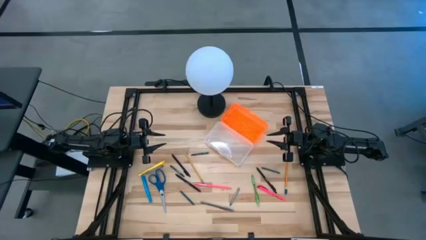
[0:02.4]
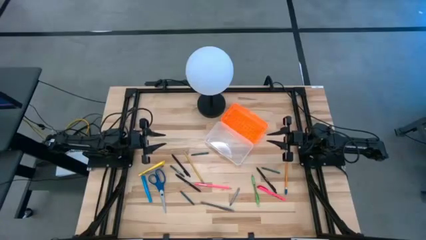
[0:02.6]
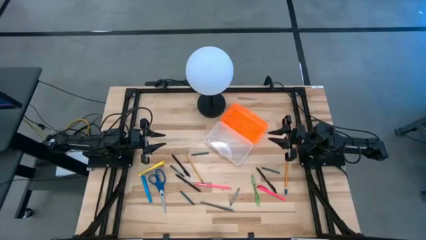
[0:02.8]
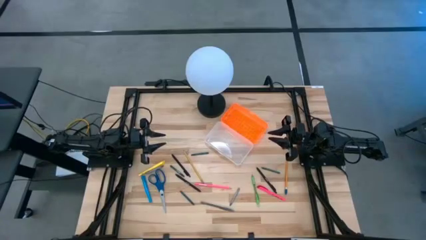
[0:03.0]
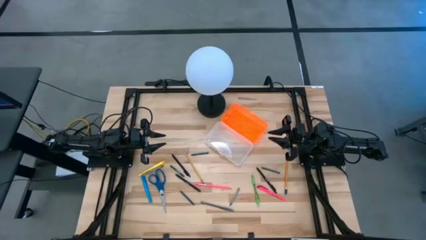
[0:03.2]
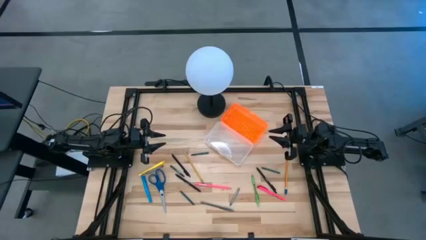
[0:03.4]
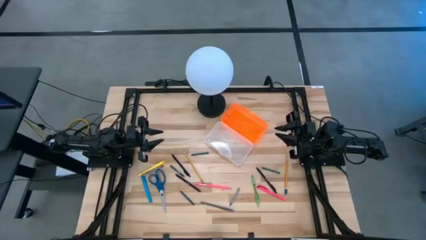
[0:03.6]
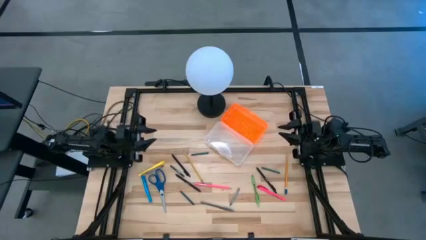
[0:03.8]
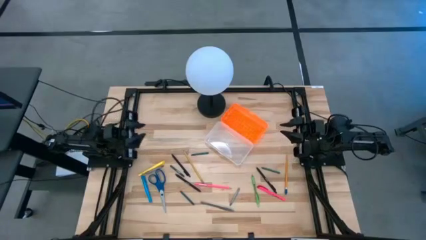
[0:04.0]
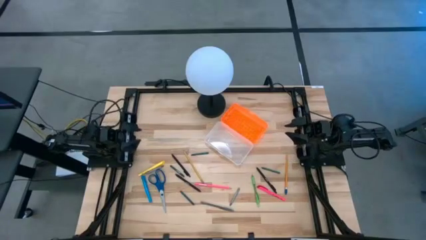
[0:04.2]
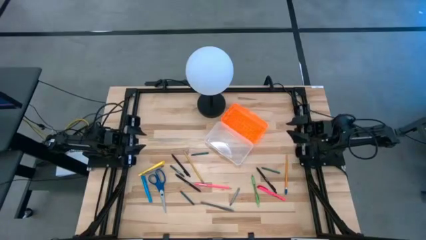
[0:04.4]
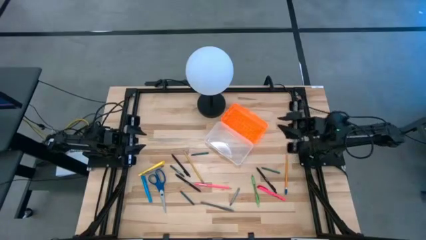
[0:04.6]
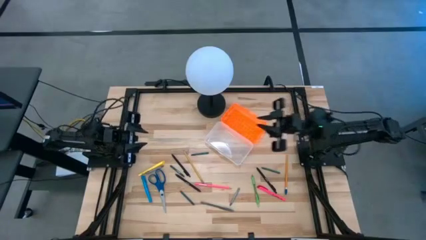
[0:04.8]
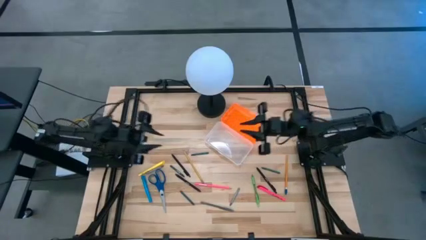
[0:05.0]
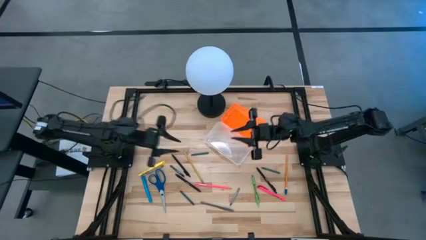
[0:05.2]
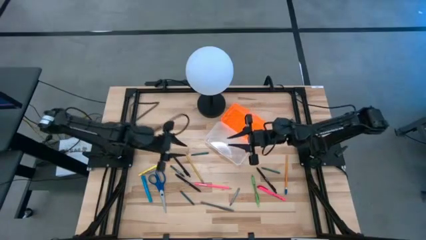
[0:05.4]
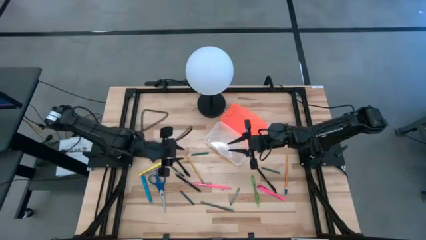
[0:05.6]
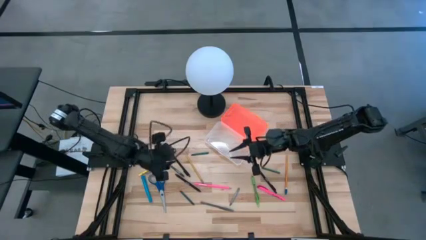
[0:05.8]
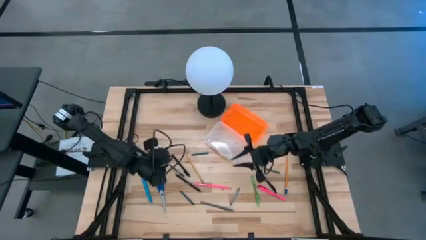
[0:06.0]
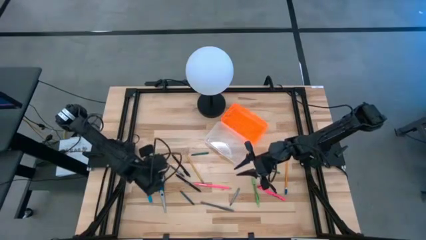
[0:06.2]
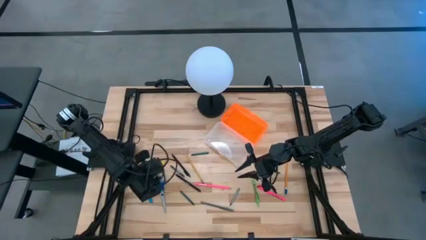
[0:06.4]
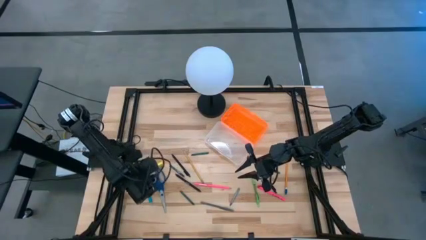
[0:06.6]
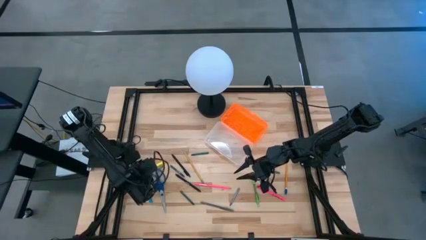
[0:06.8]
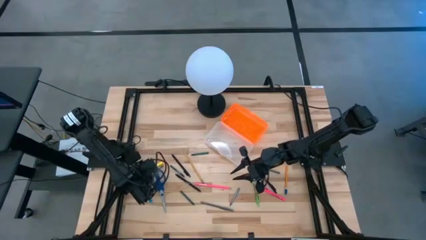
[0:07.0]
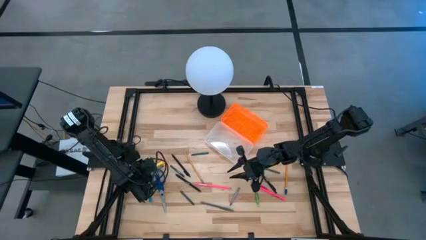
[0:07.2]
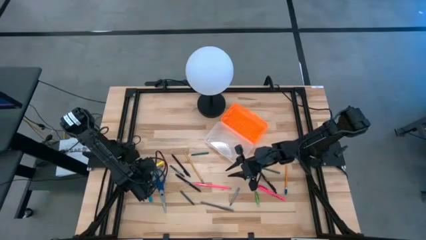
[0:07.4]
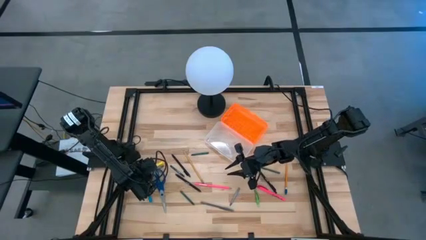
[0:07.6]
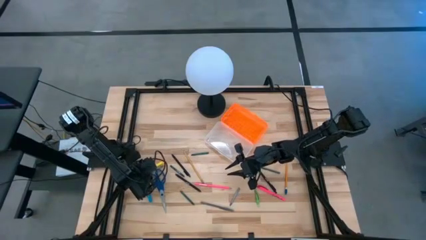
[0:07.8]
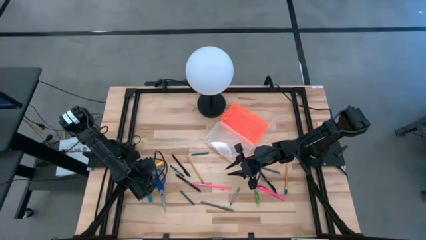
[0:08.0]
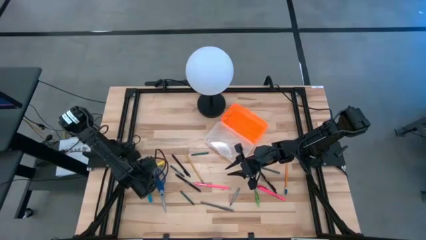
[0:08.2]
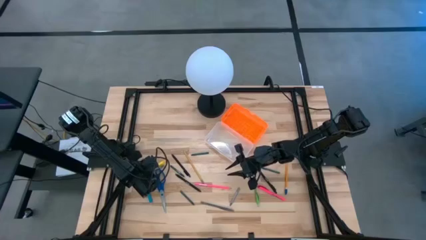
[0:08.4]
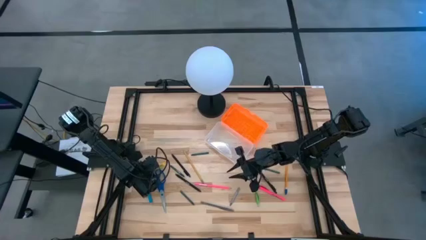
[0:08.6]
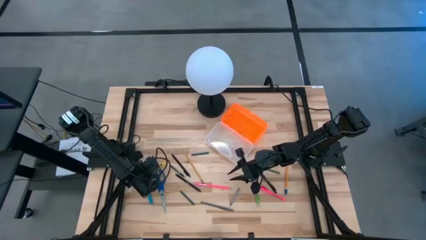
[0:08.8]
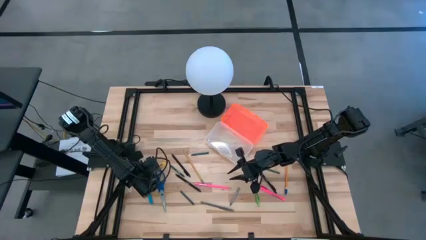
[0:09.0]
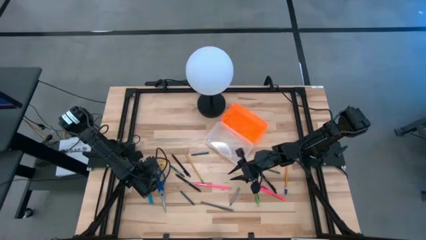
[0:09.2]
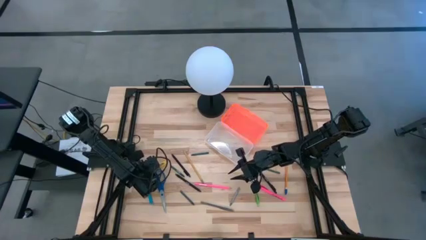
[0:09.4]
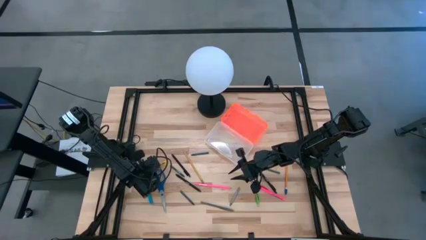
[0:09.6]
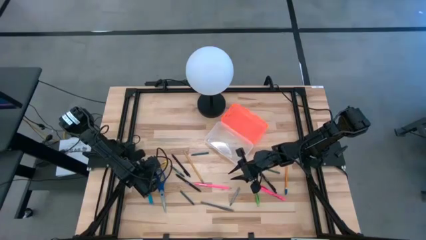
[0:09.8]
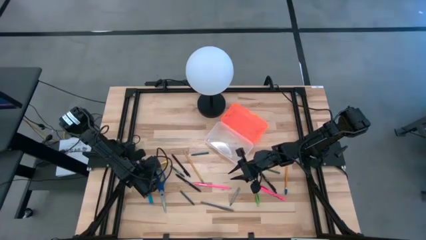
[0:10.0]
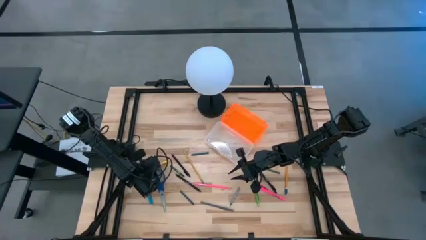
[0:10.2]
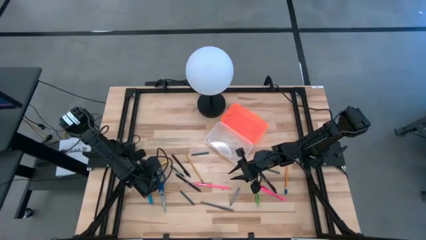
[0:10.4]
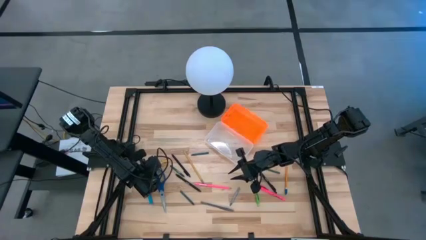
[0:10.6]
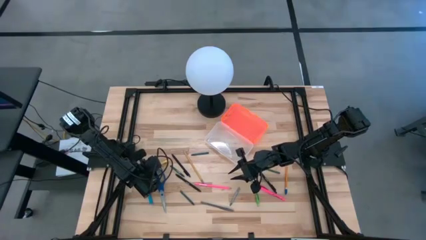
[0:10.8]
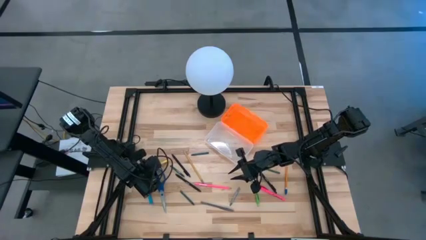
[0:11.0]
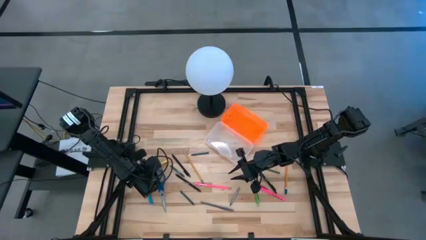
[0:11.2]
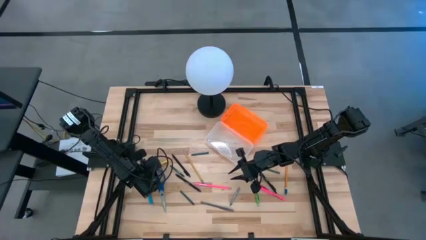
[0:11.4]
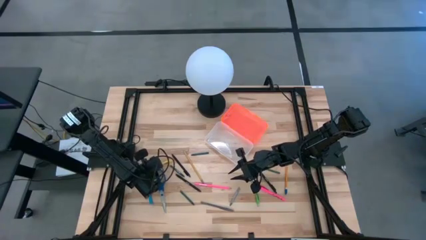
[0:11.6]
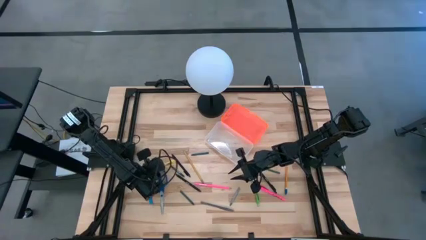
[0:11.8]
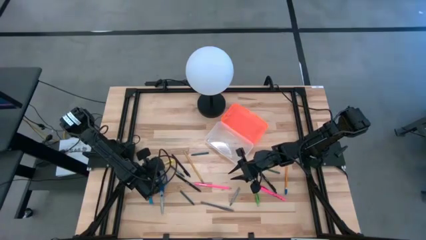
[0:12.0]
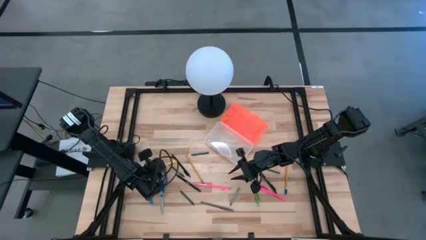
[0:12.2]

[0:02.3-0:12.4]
Task: Pick & place school supplies into a supply box
Put the yellow pen into the orange supply box

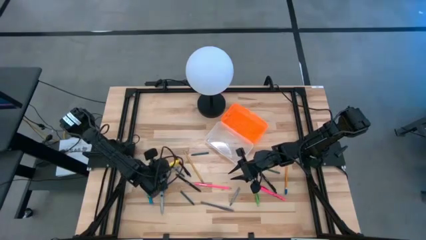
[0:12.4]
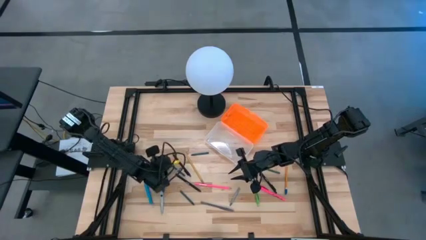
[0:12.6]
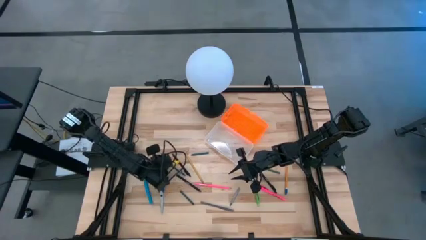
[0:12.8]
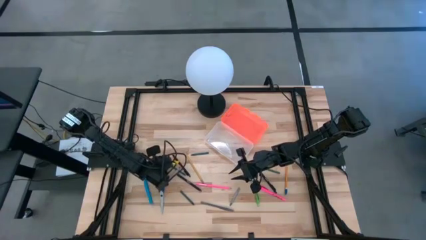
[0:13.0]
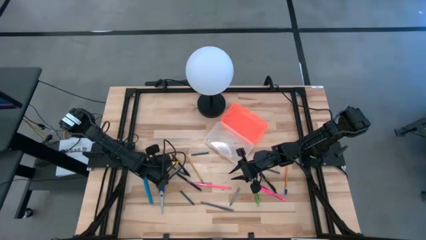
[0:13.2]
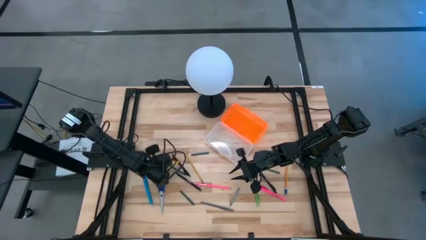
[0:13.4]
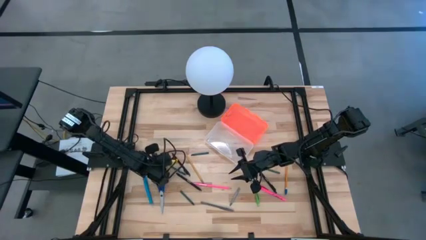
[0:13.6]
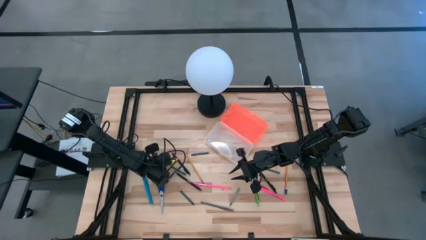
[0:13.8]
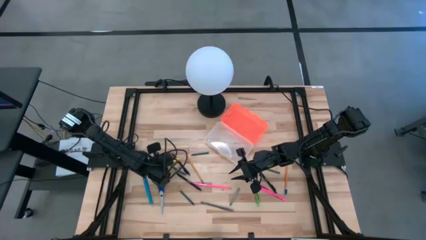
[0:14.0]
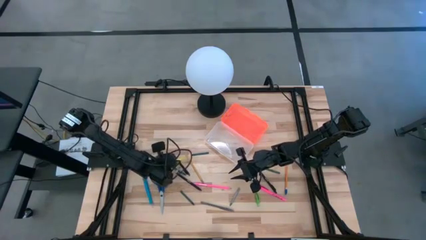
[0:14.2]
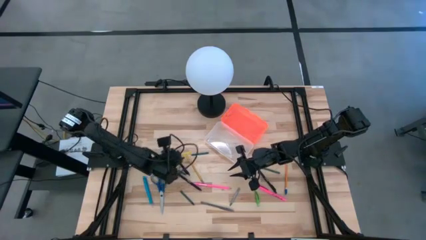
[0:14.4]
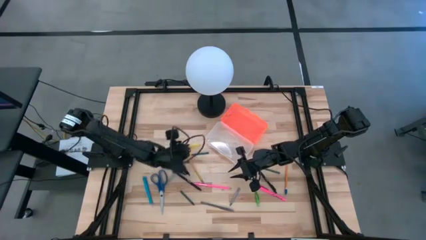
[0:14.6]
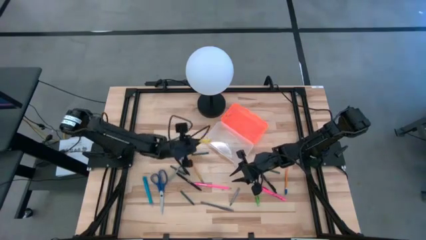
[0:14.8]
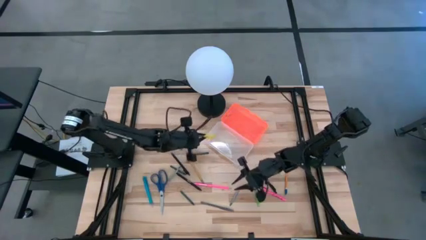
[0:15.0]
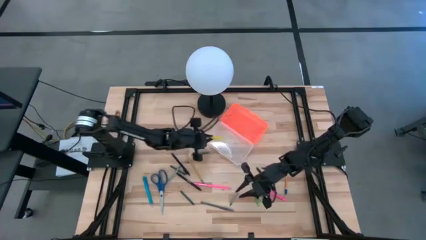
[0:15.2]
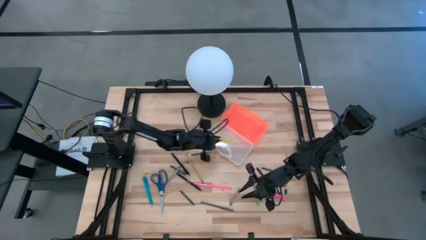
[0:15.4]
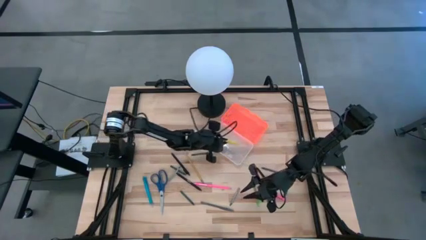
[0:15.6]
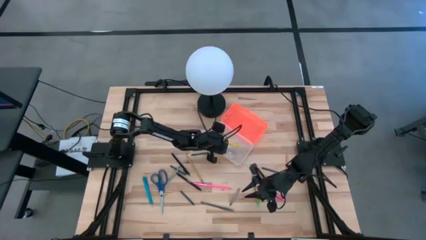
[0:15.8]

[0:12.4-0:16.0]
Put the yellow pen into the orange supply box

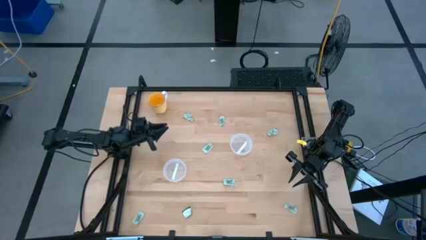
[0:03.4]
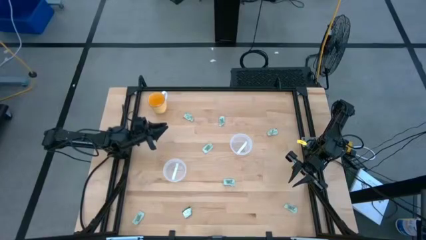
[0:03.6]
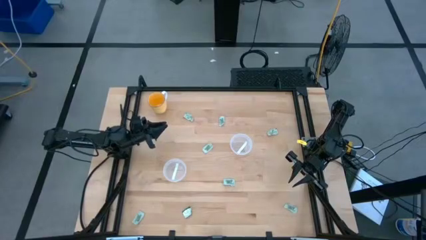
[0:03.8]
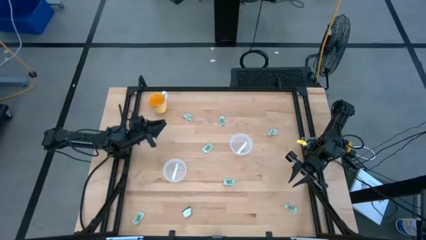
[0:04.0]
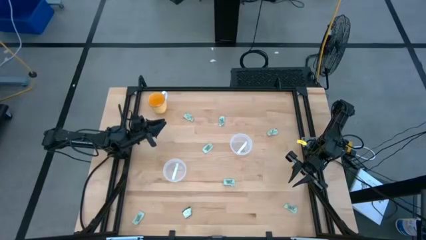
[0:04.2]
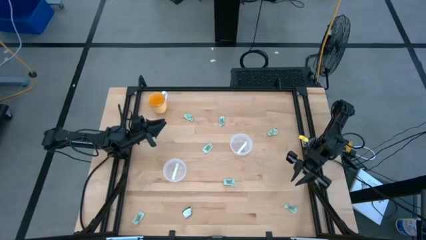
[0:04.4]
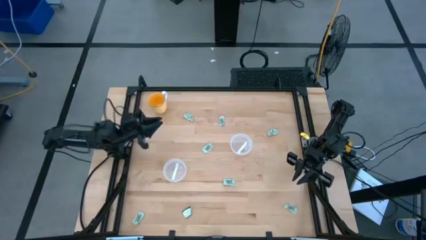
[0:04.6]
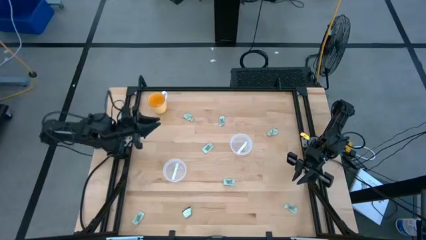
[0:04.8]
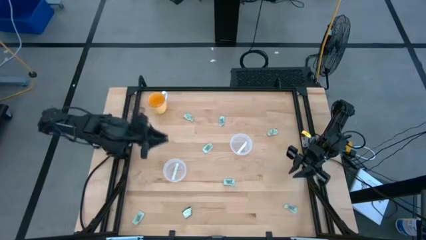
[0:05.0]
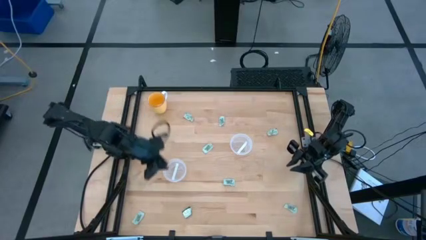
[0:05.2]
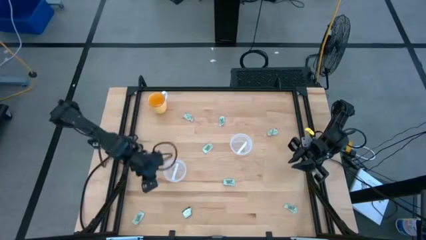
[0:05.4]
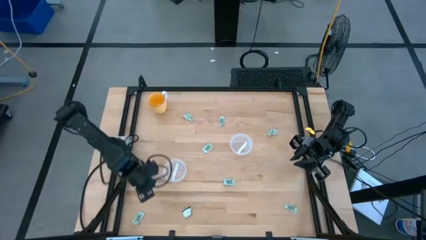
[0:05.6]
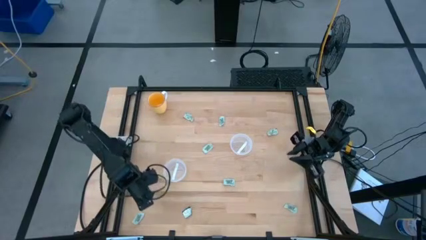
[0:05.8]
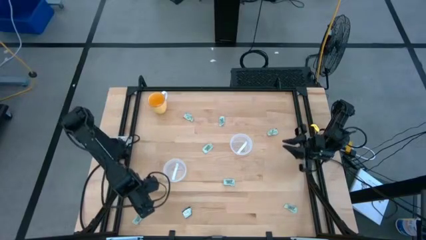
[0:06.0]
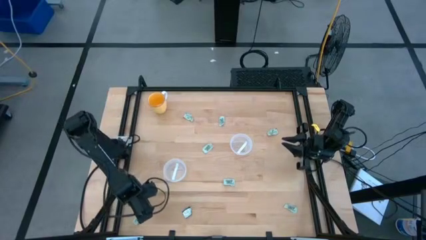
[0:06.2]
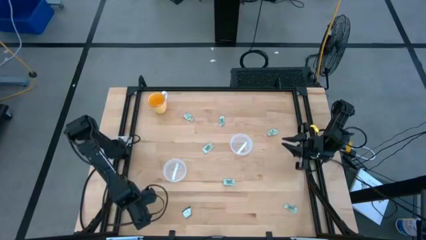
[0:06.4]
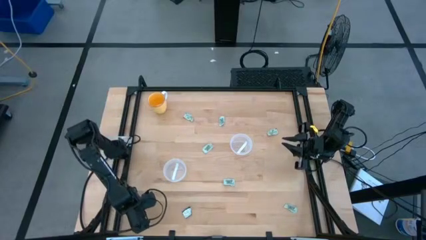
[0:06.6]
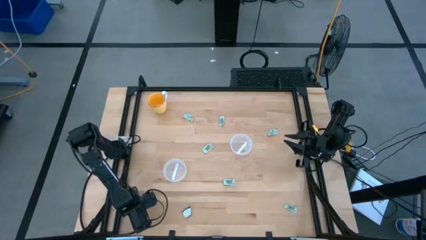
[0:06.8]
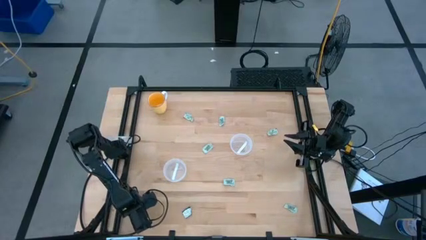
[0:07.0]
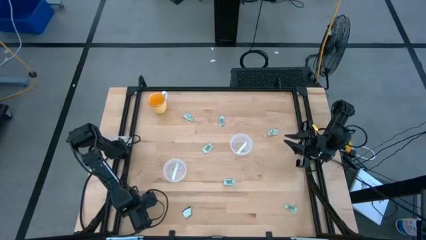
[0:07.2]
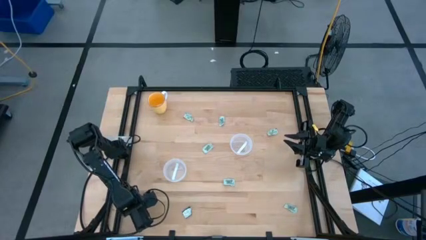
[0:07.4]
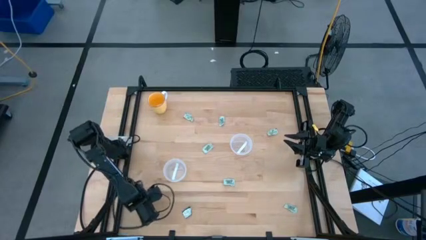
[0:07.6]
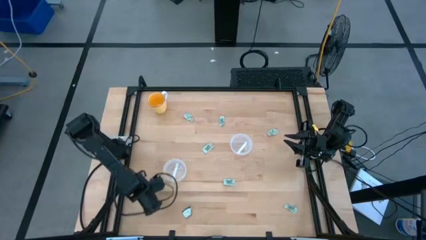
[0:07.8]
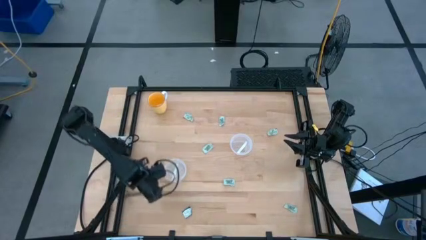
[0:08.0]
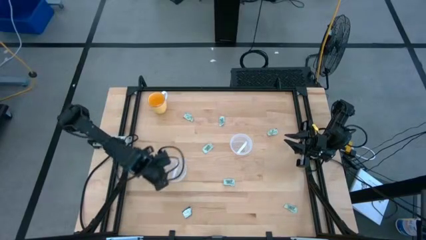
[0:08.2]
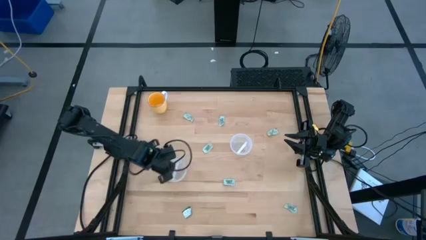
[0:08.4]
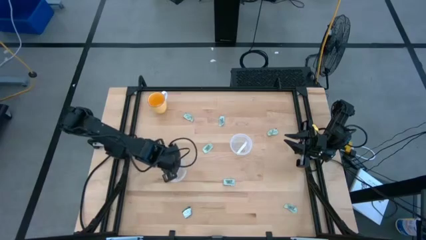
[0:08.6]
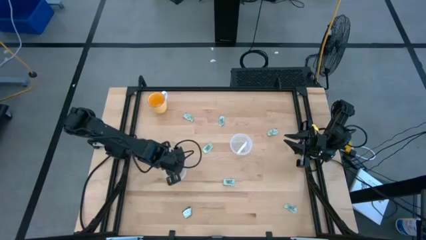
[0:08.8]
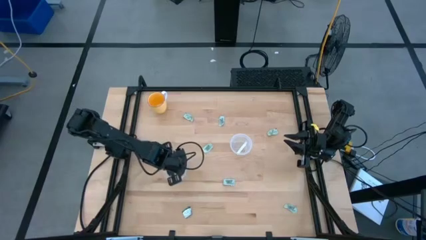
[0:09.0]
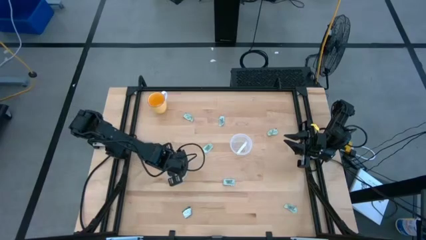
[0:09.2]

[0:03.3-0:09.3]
Task: Pick and place Stevia / Truvia into bins
Put the white stevia packet into the bottom transparent container
